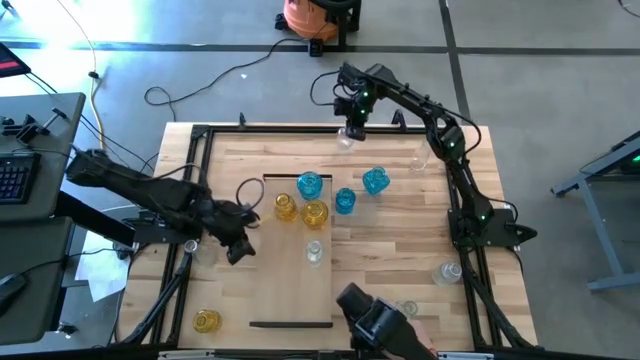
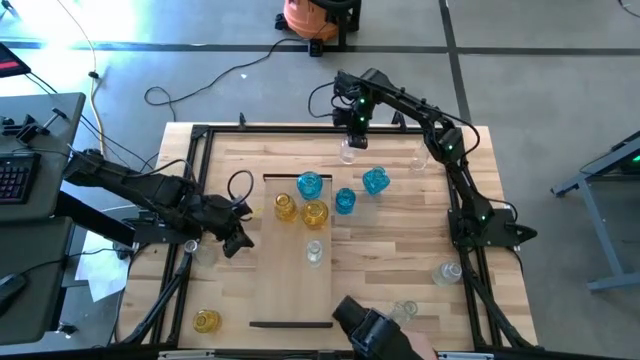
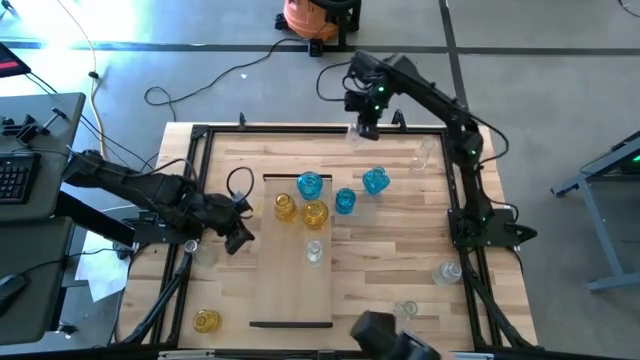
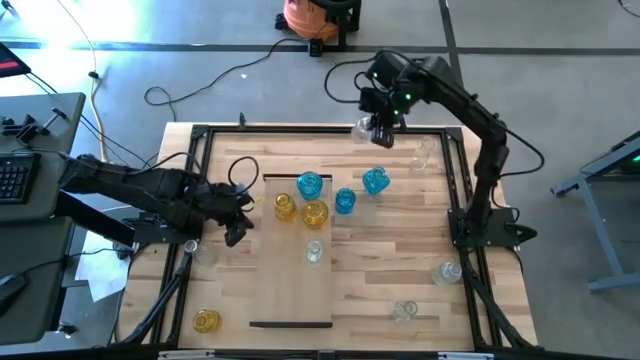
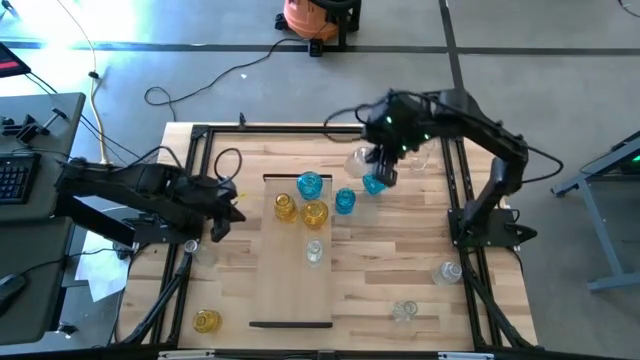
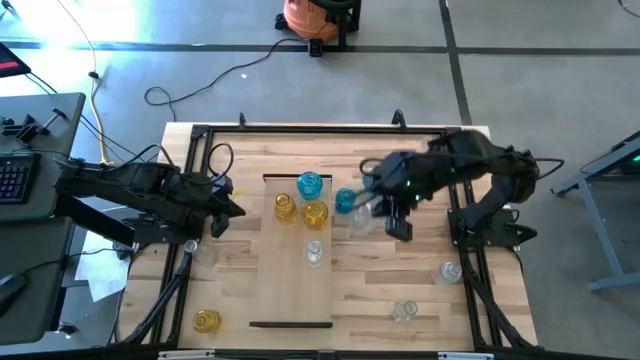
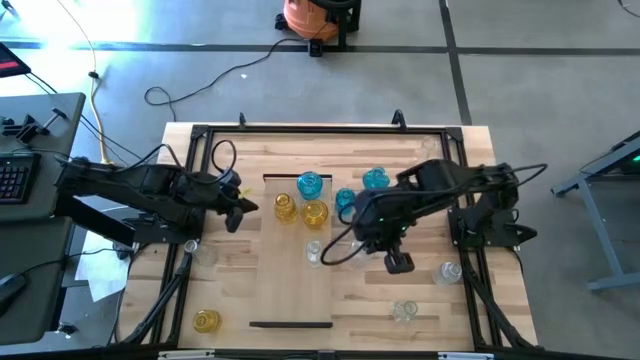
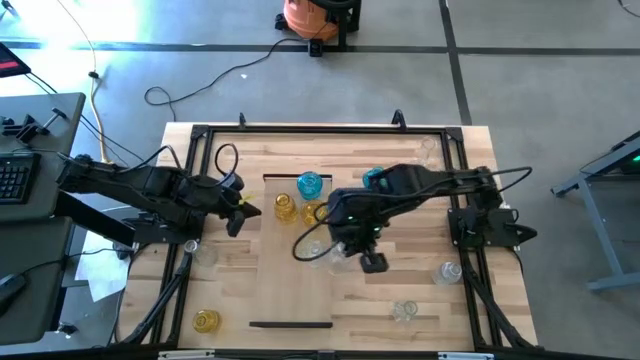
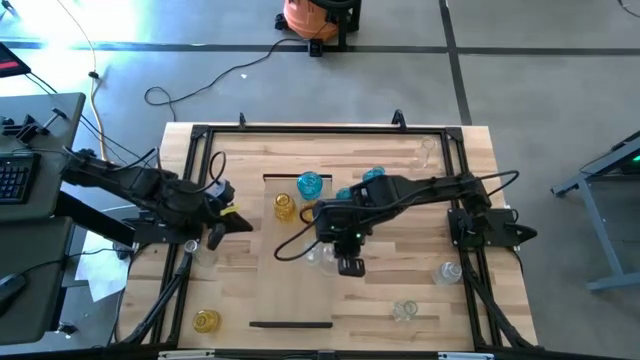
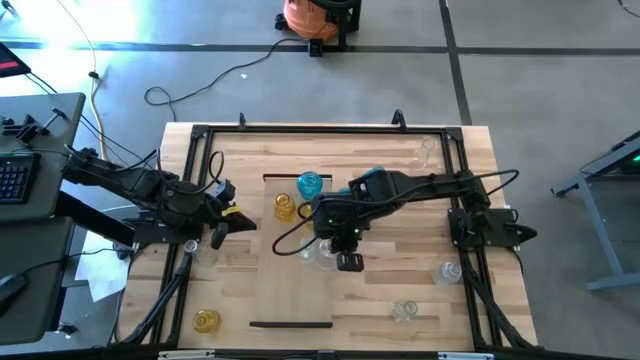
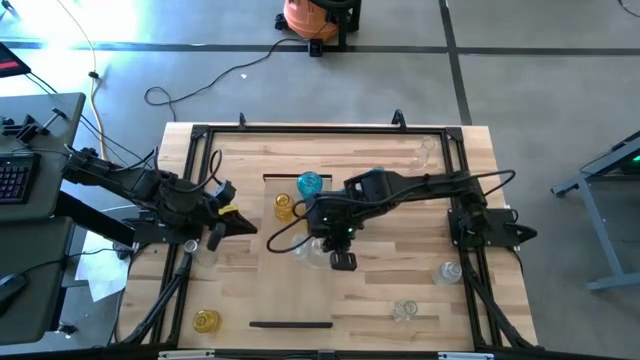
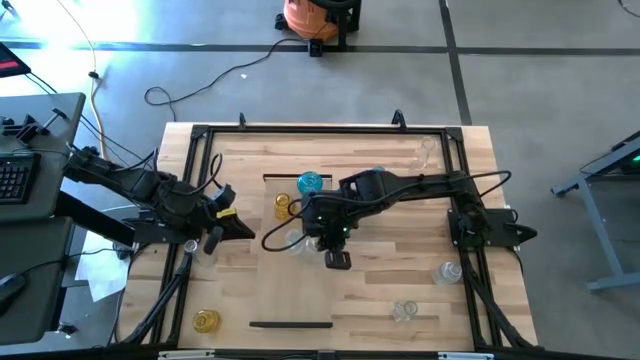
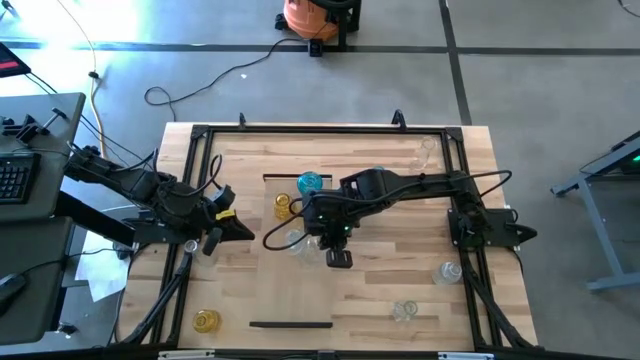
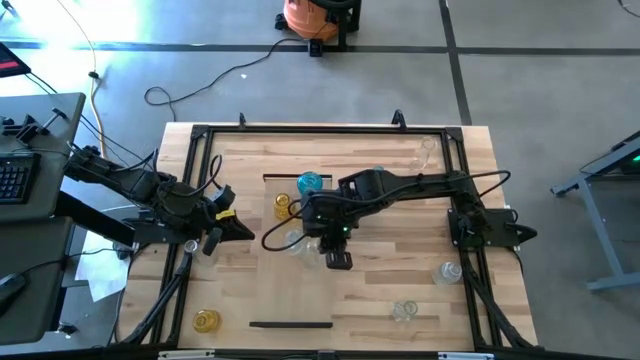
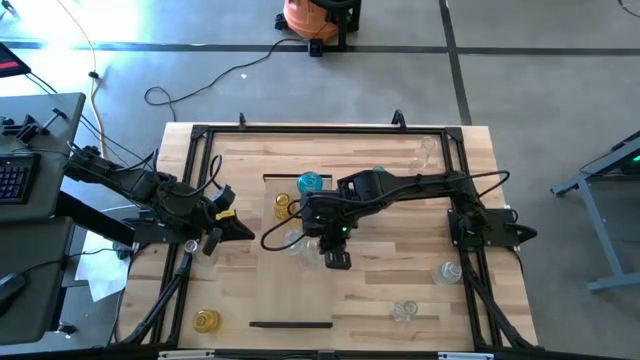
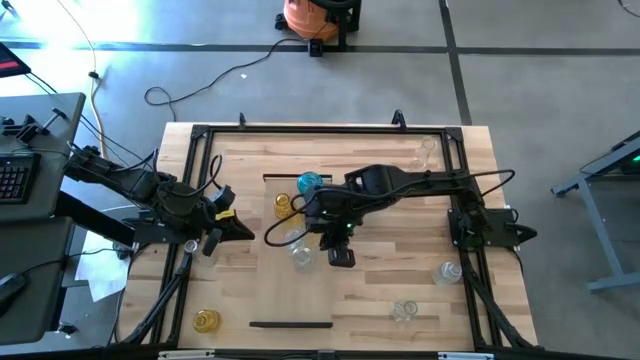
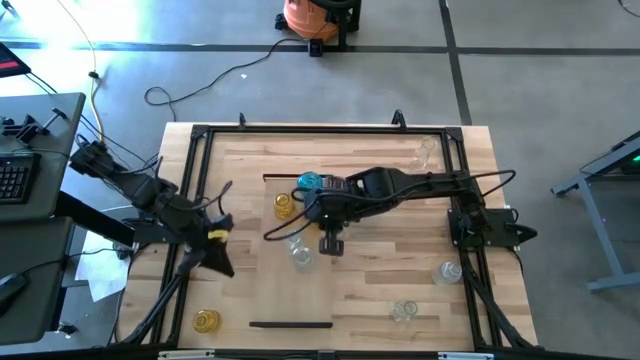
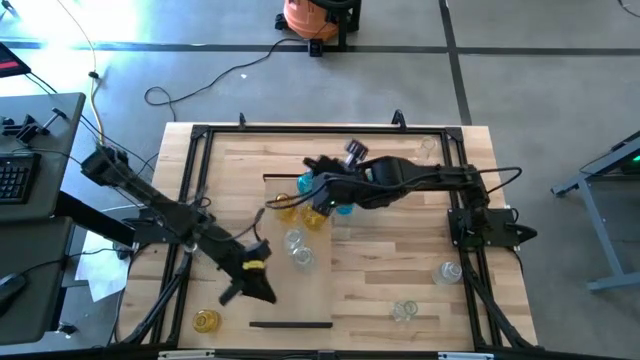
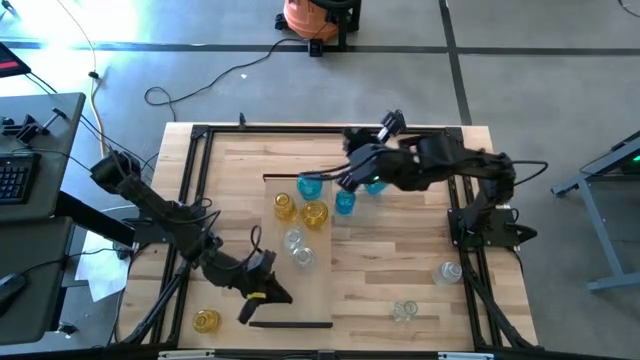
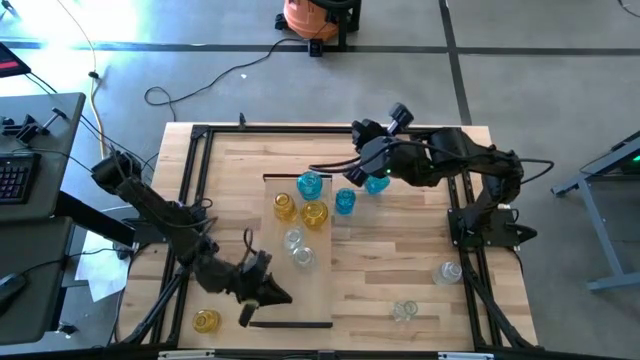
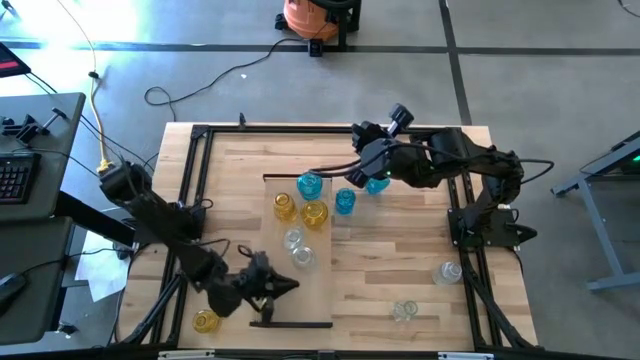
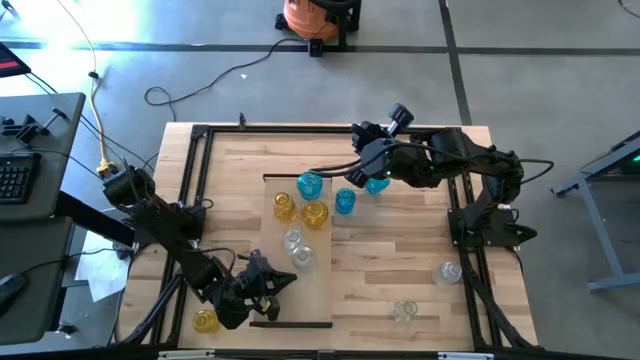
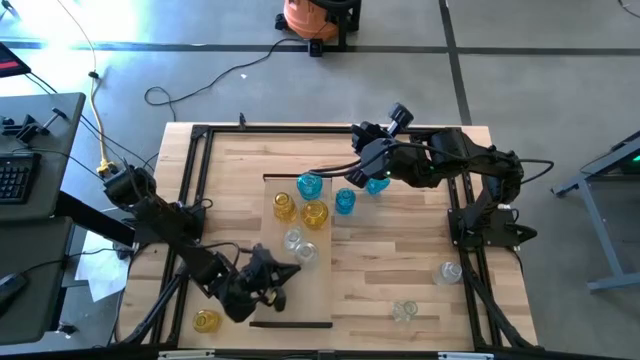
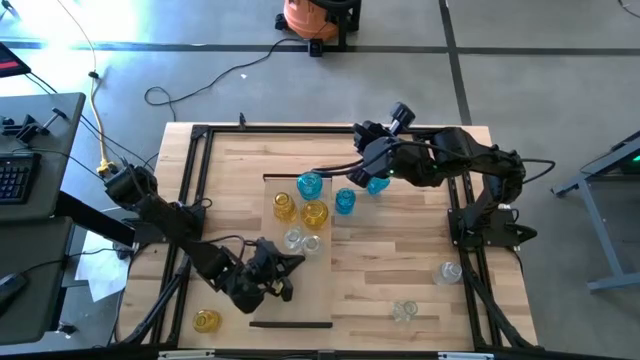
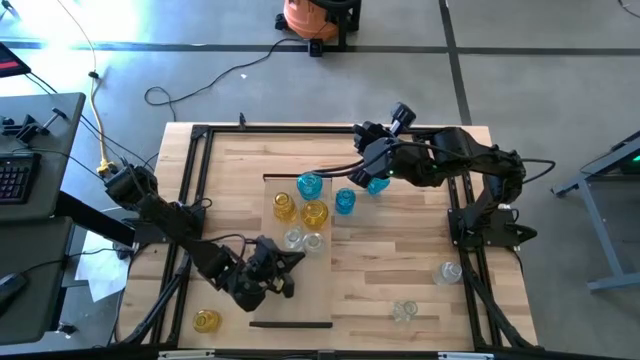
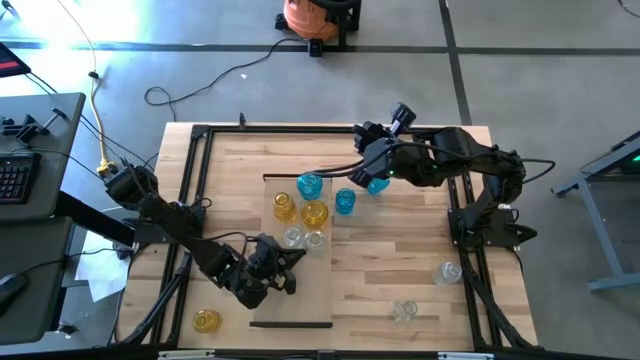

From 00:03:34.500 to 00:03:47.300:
Task: sort vases onto shelf
Put the left transparent vase on the shelf to align with the other transparent bin

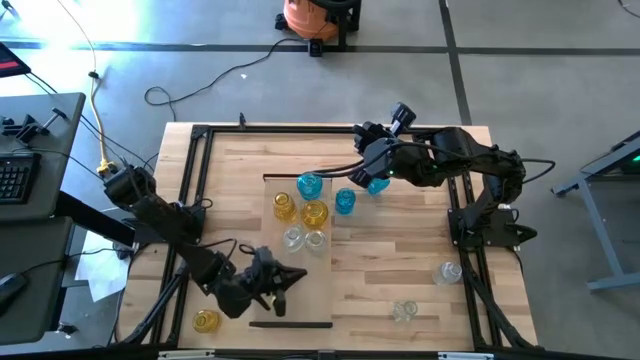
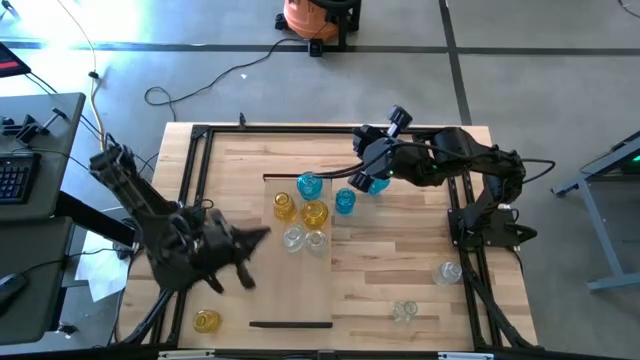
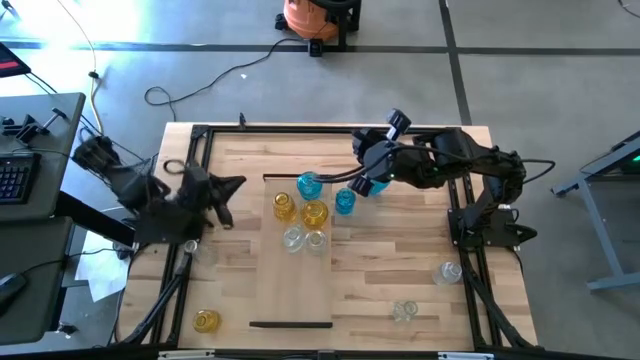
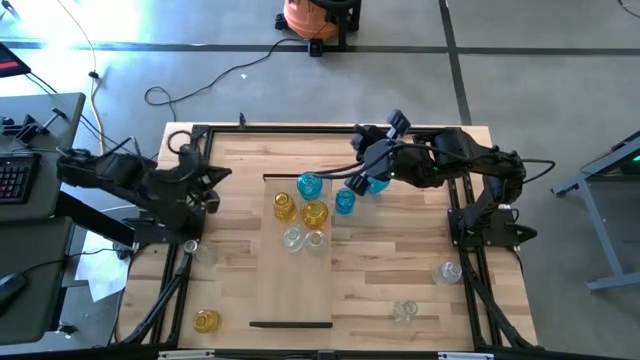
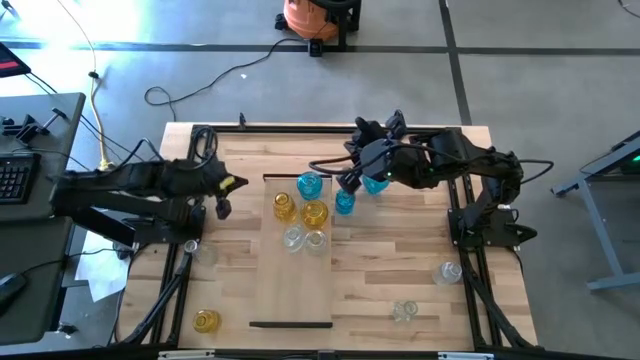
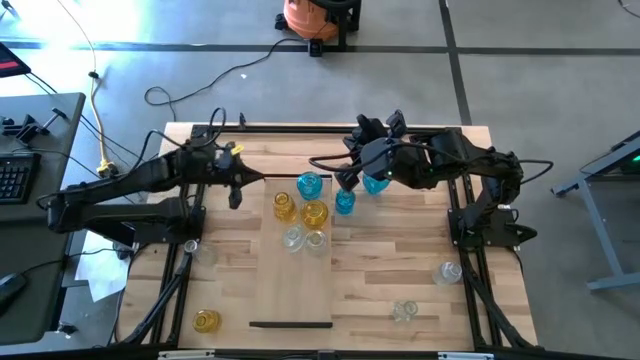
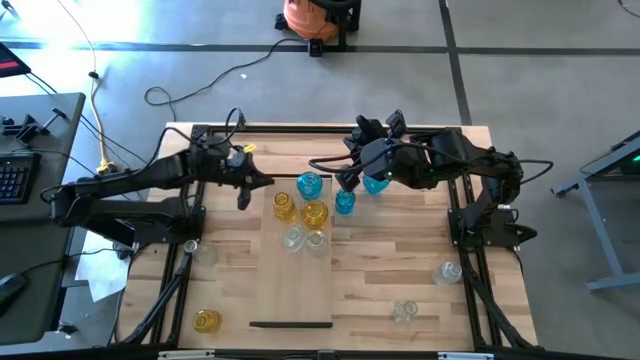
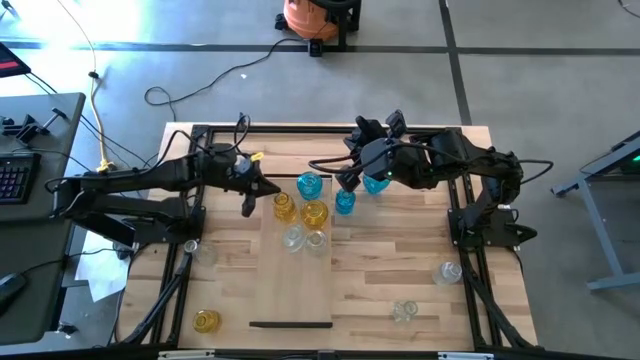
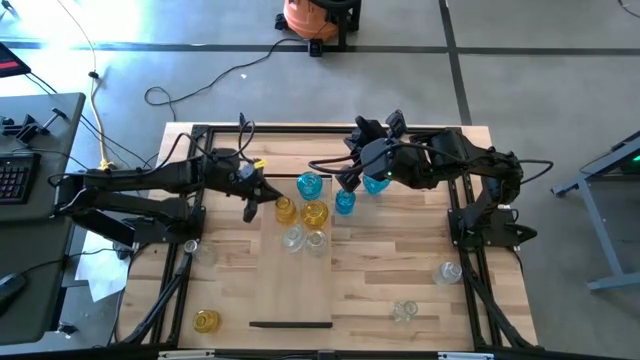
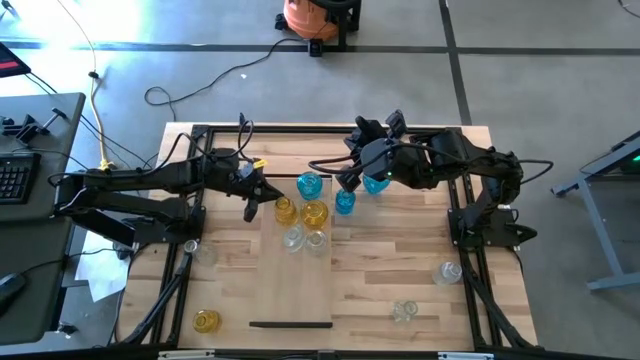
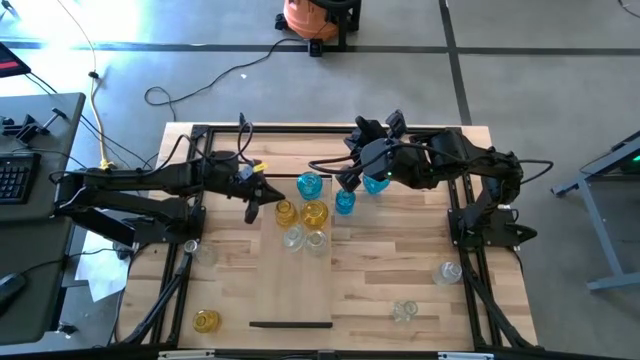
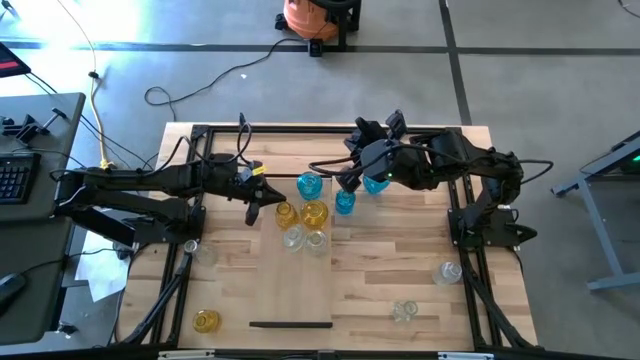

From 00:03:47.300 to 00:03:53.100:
Adjust the yellow vase on the shelf

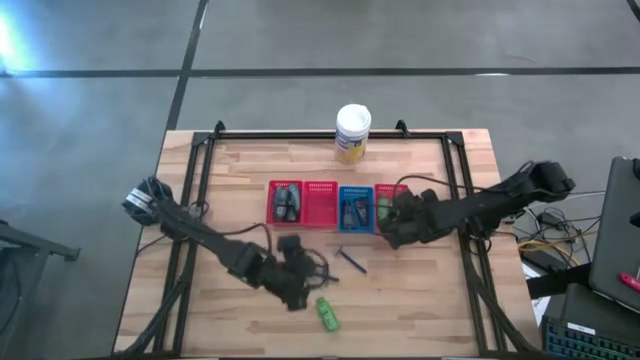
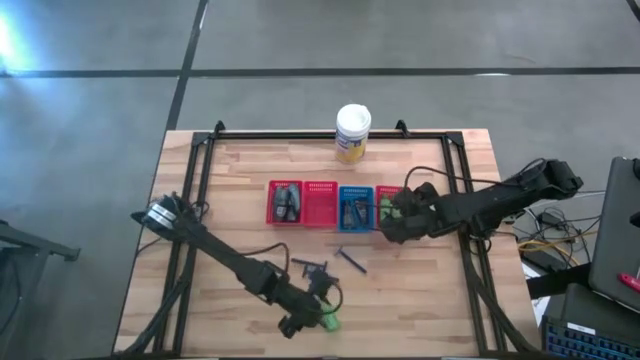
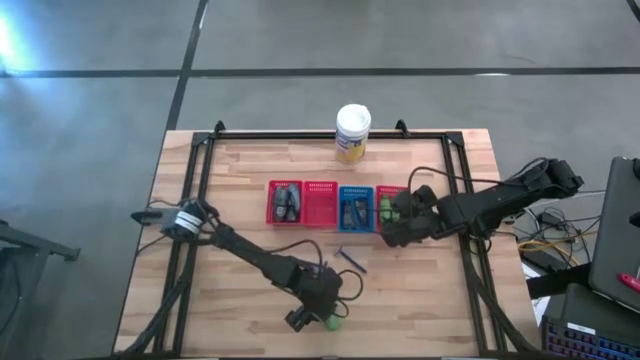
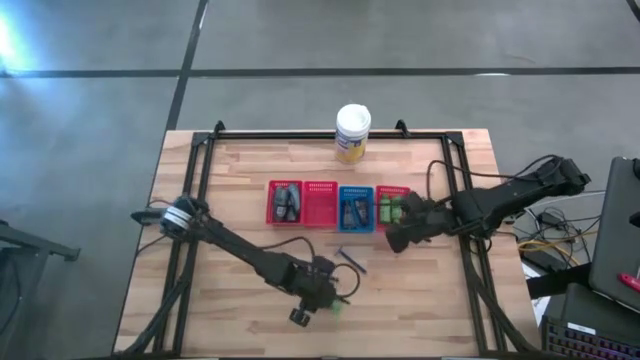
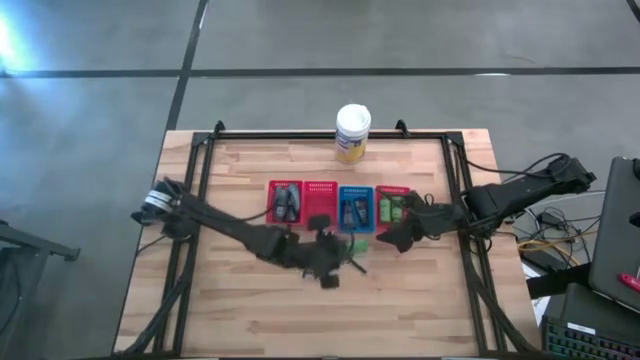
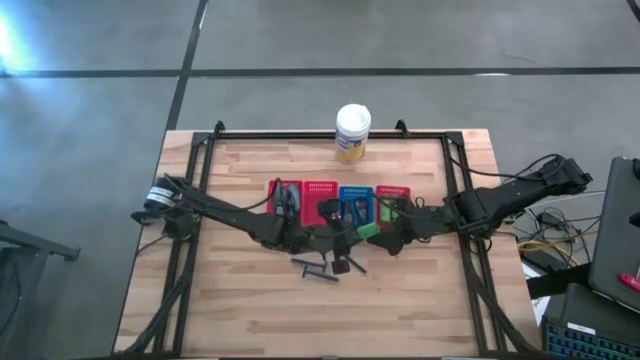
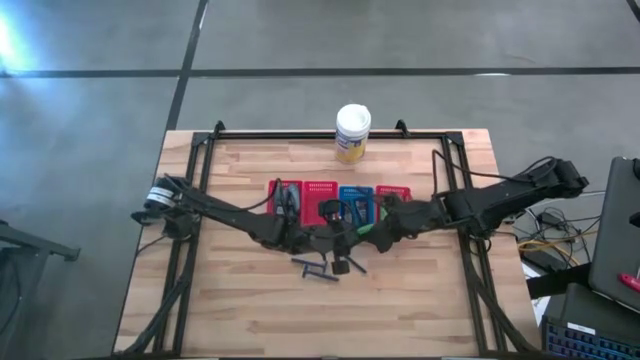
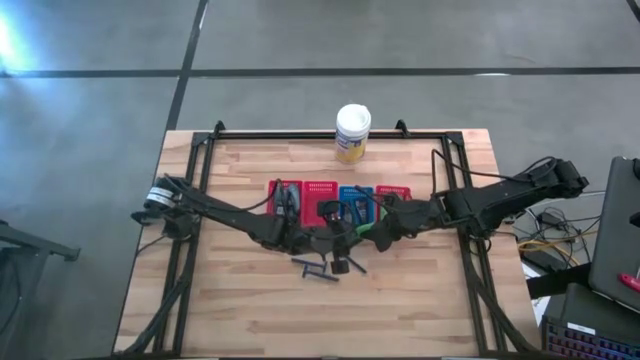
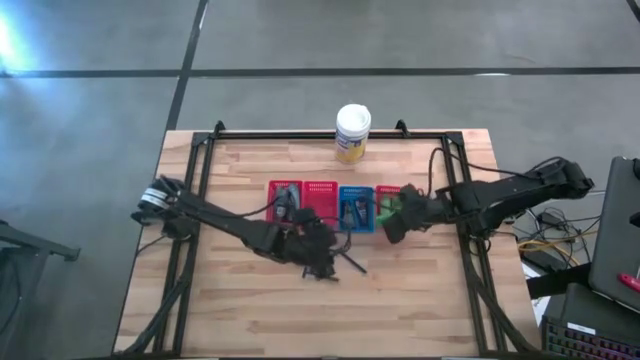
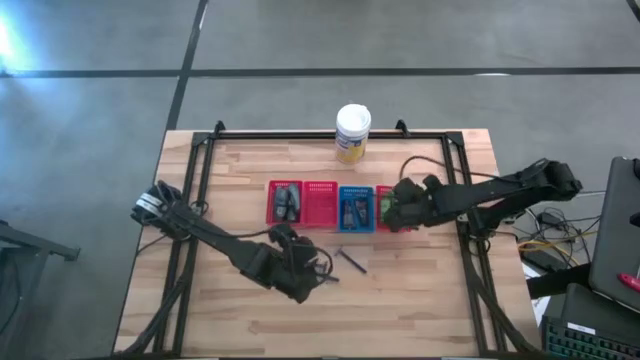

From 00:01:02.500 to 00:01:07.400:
Task: Pick & Place Travel size toiletries
Put the green shampoo into the right red bin
